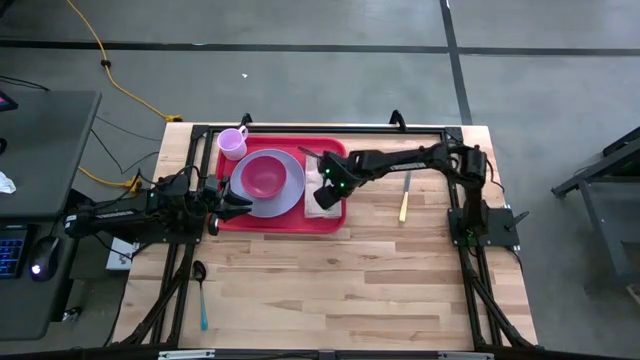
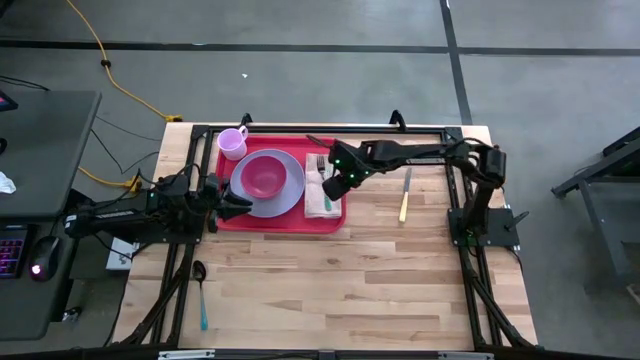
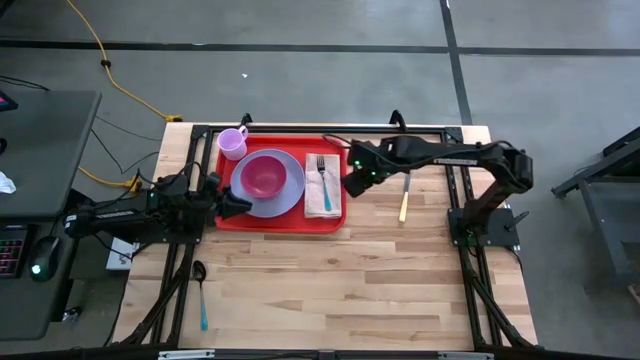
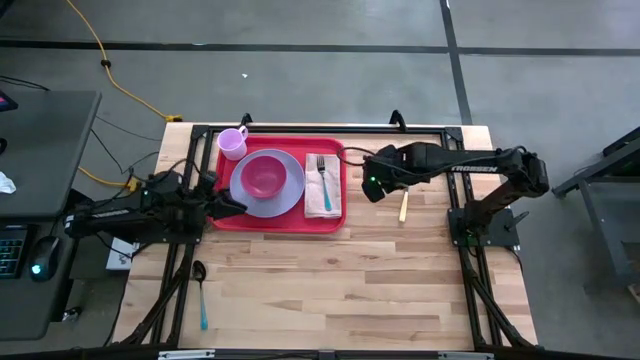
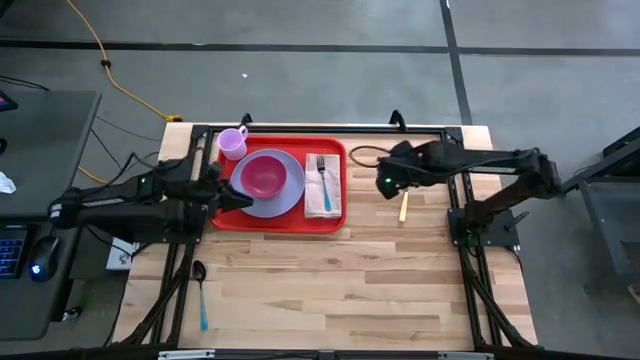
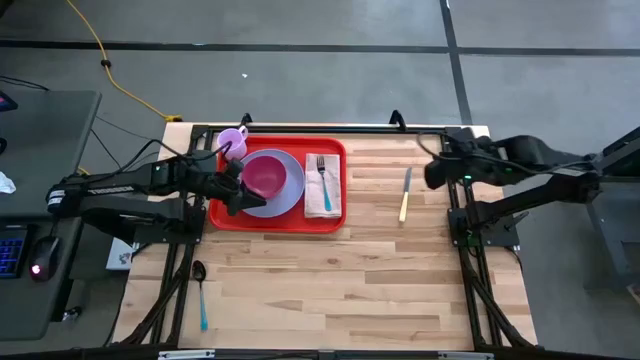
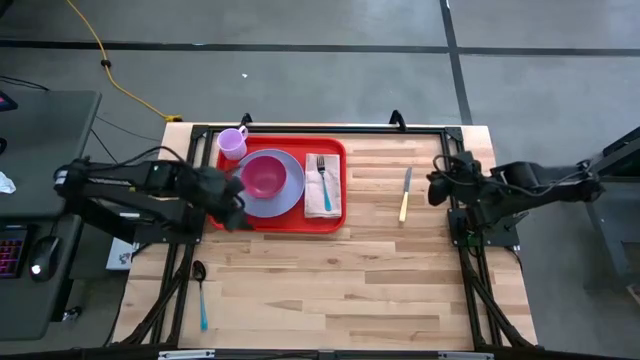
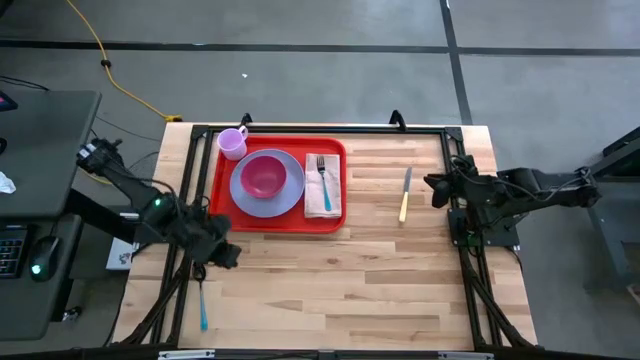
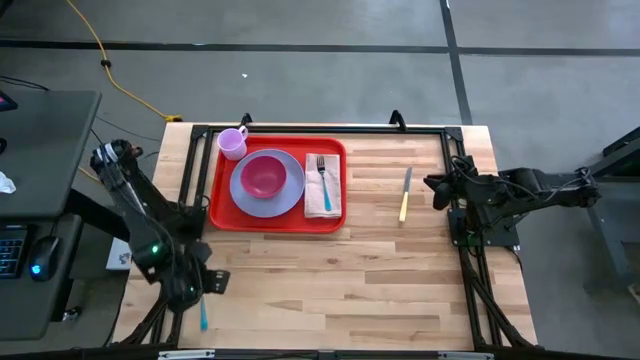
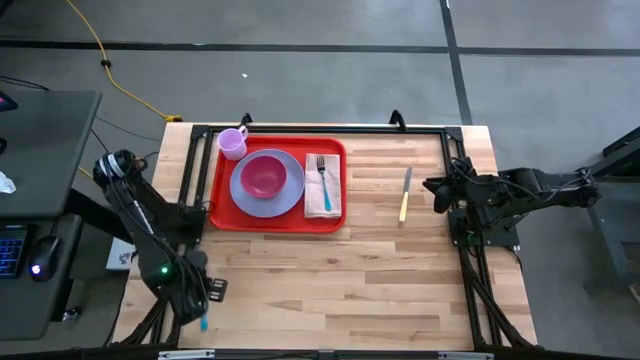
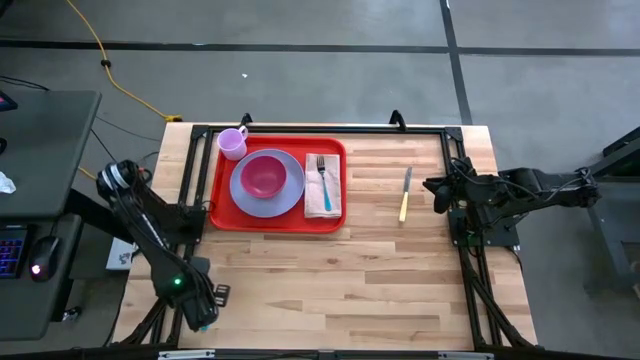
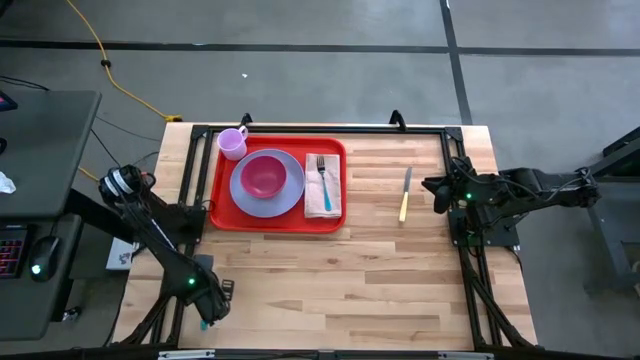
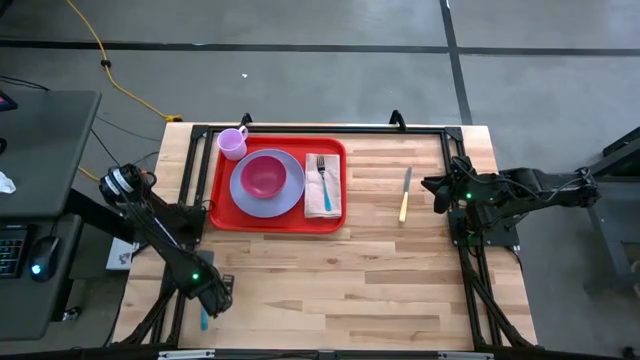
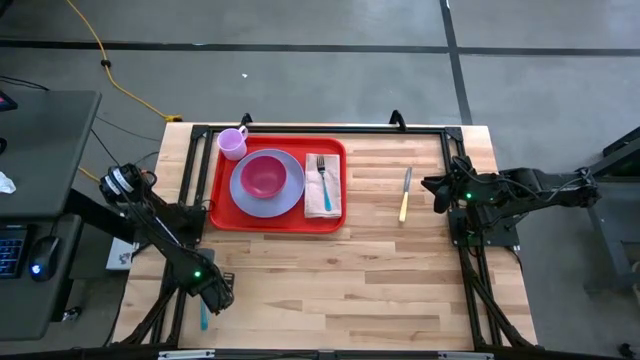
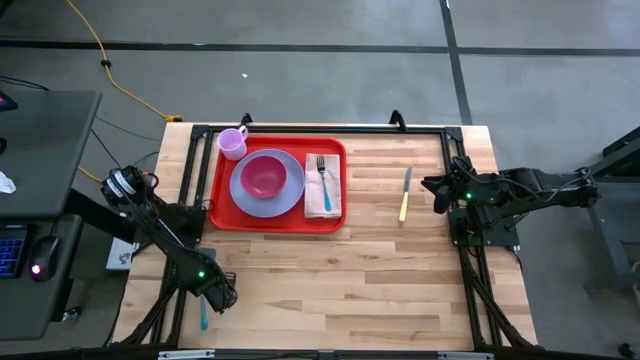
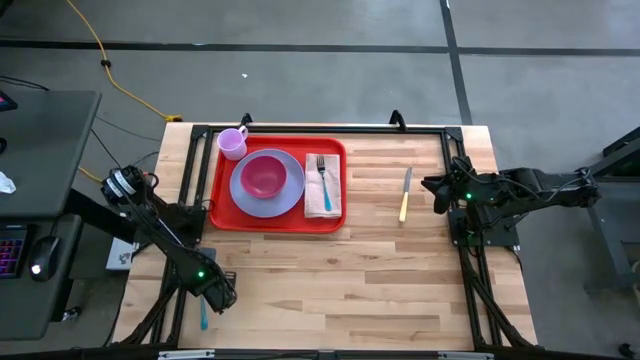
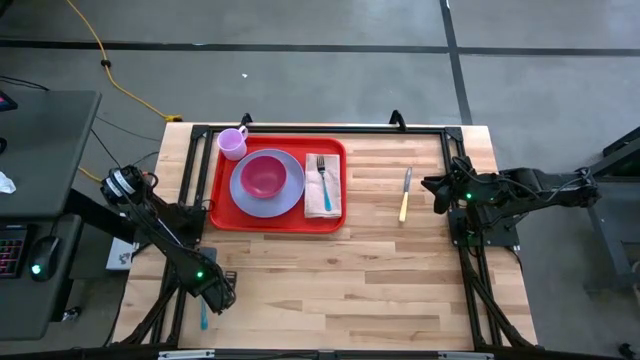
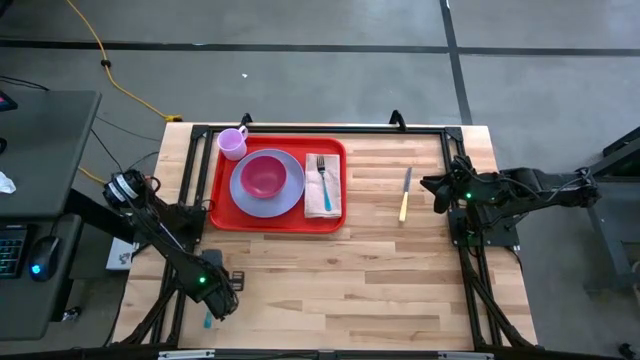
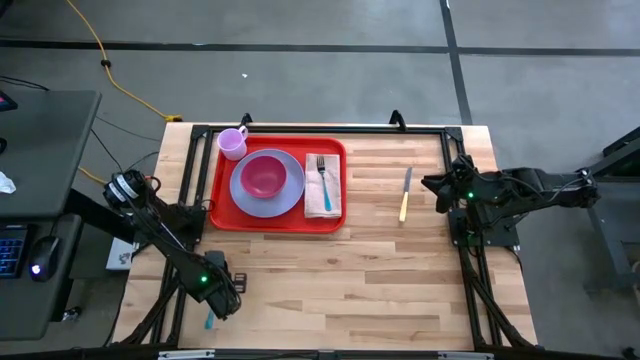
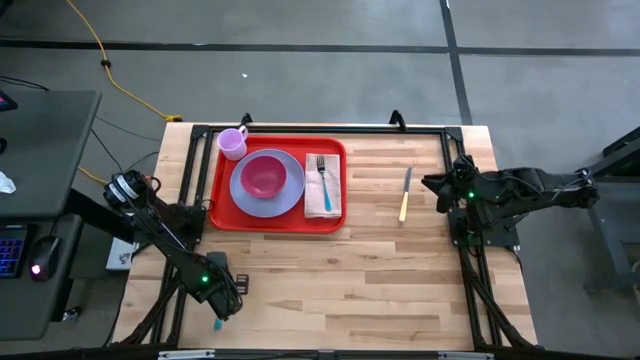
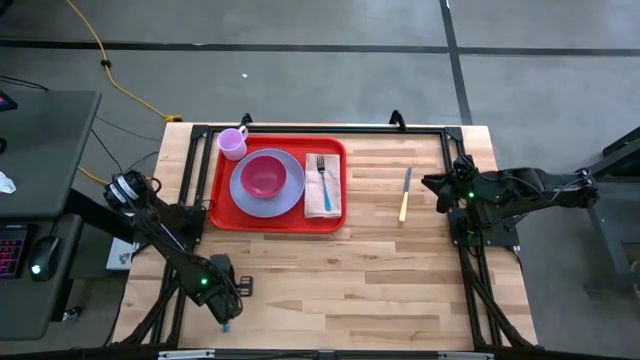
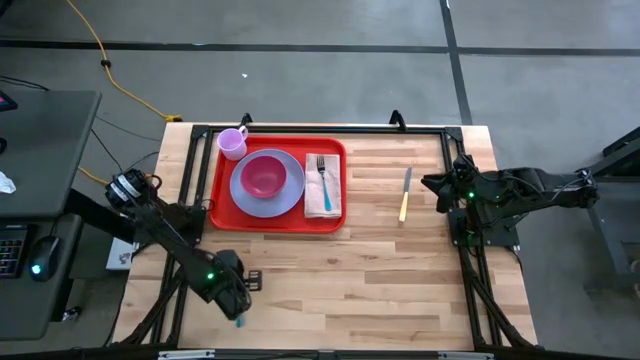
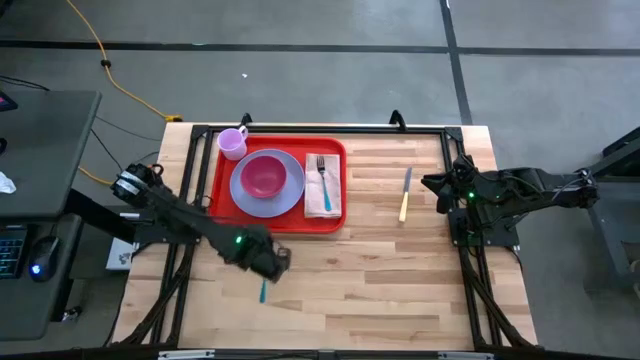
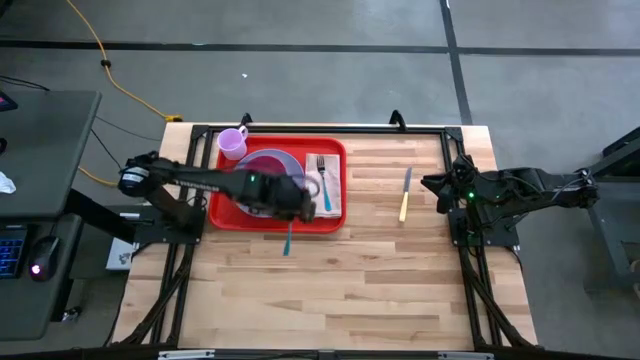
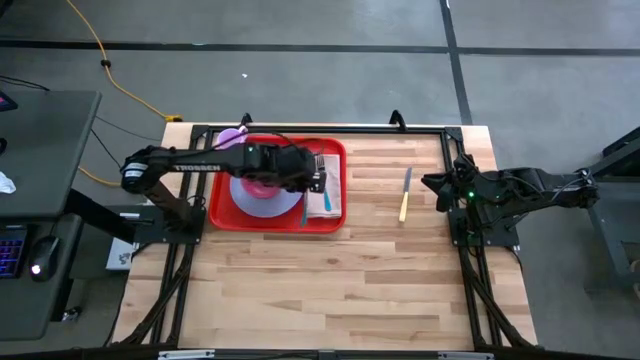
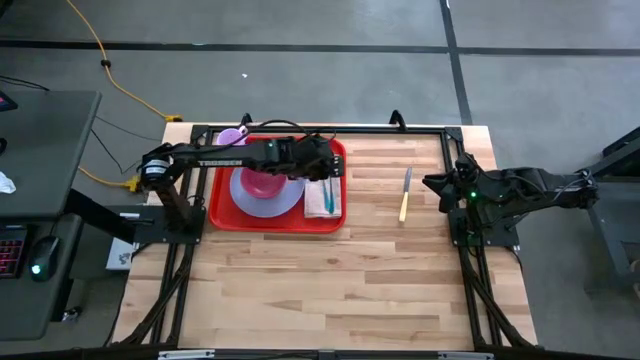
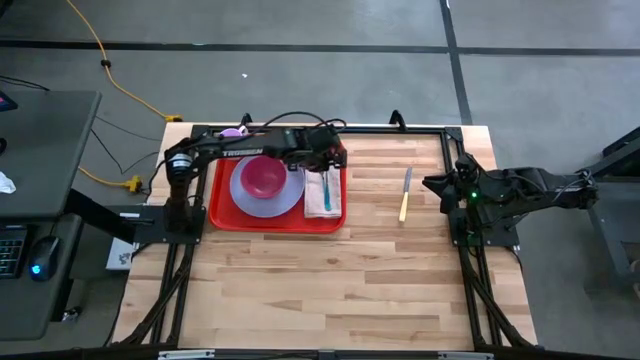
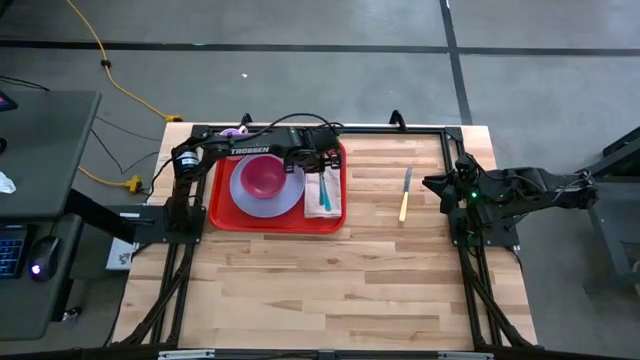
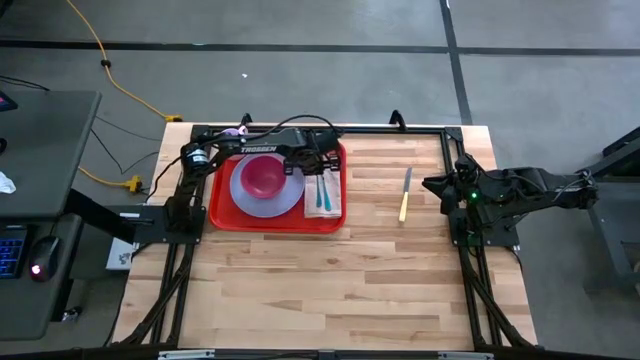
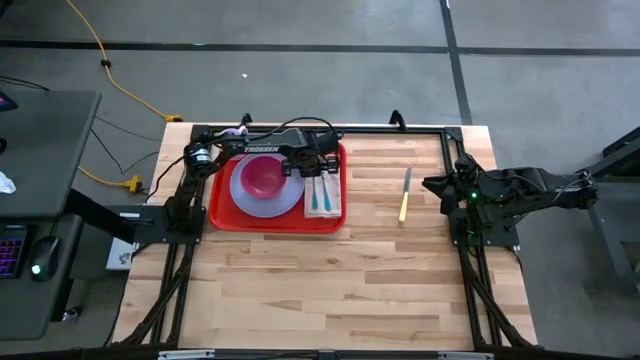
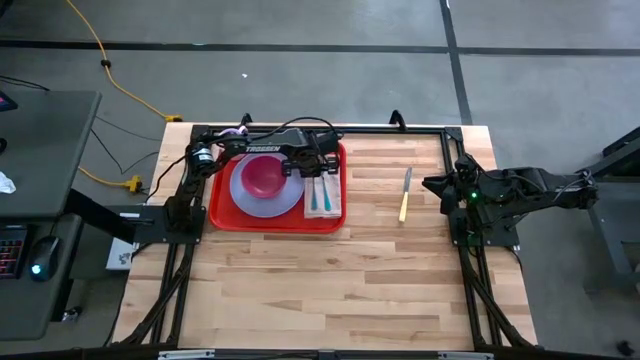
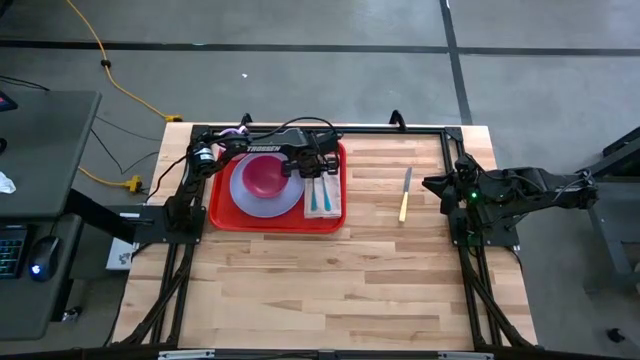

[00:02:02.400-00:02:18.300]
Task: Set up tray
Put the blue spoon on the white table napkin to the left of the blue fork

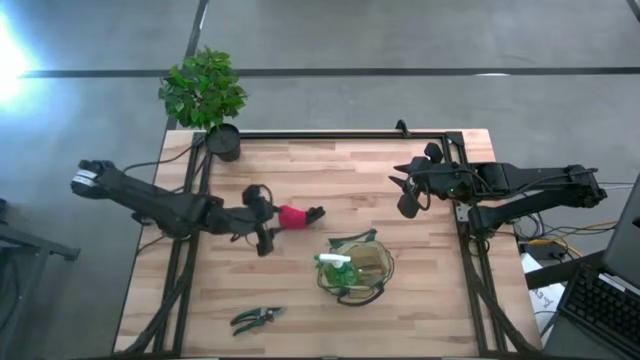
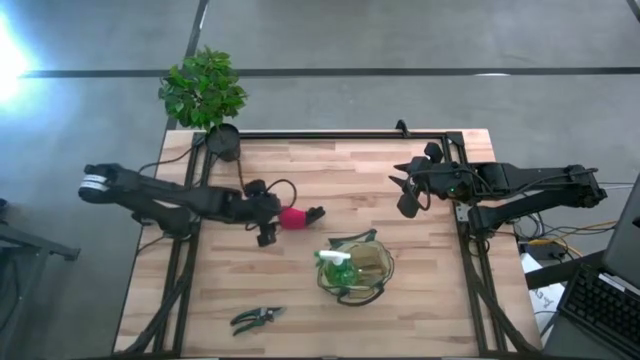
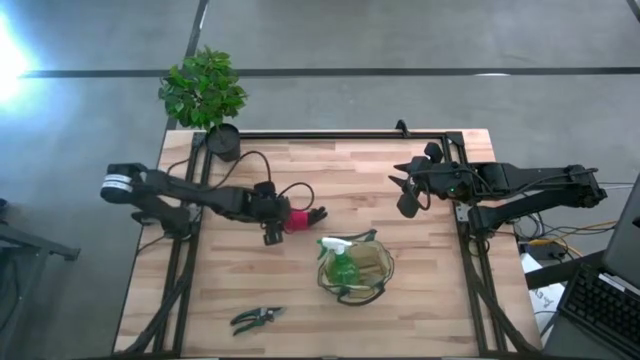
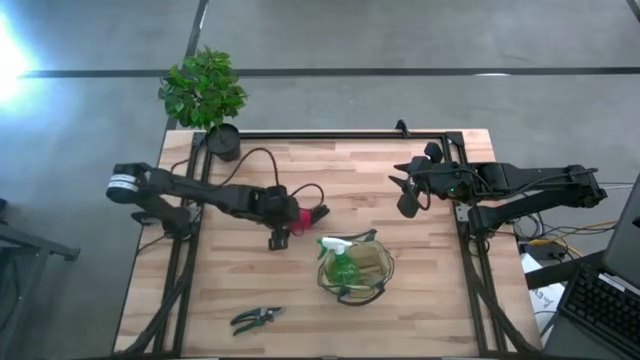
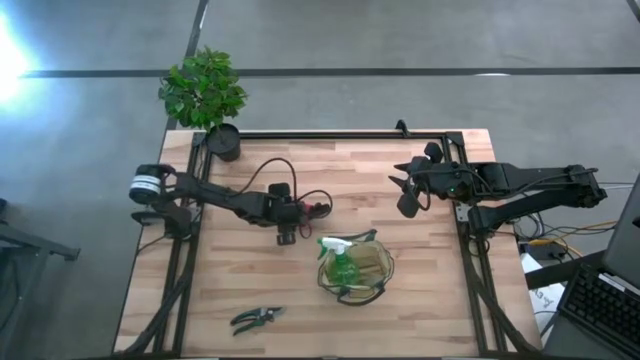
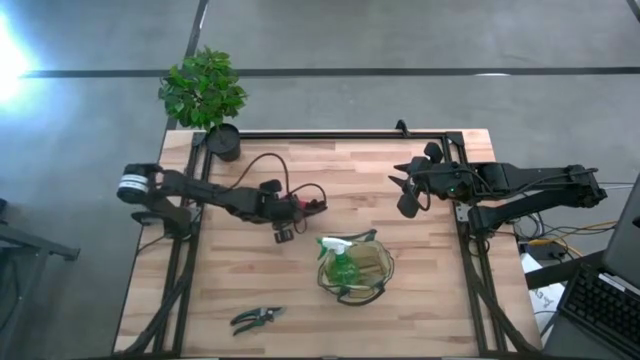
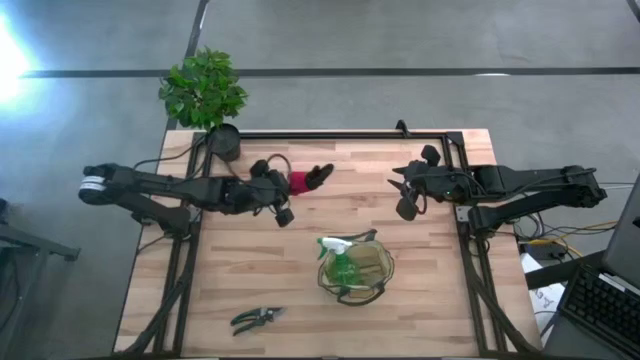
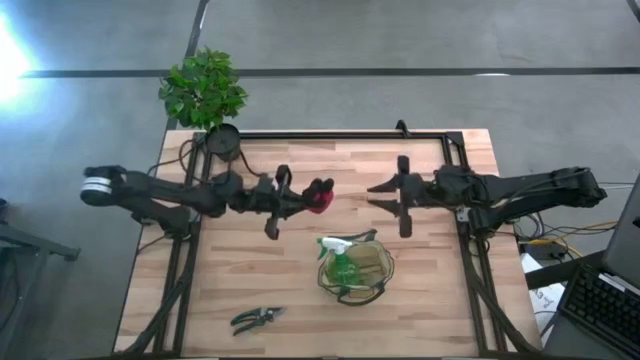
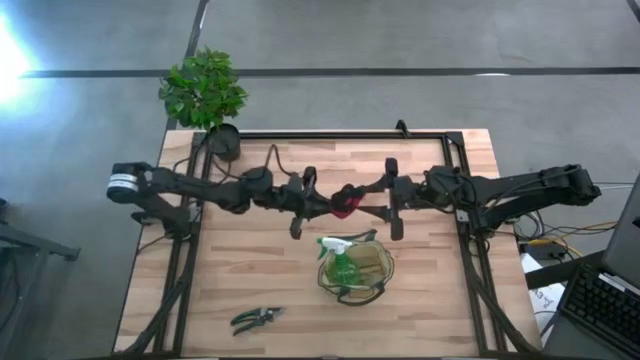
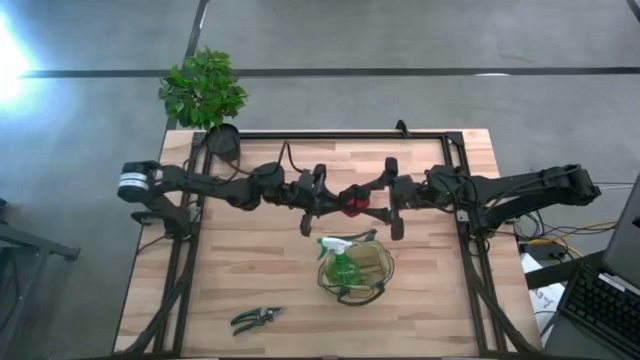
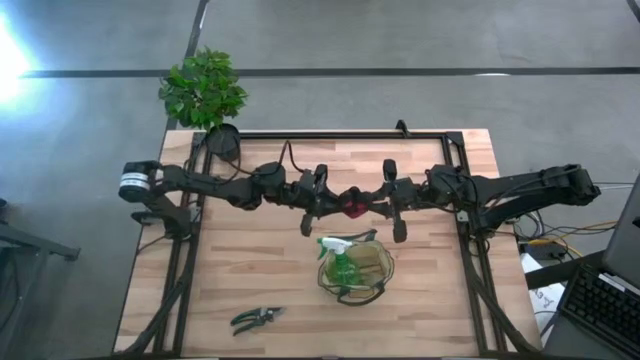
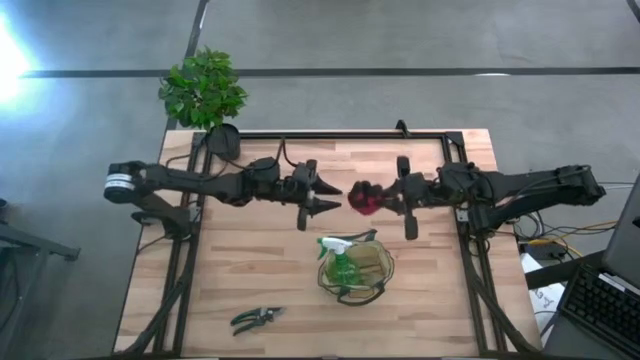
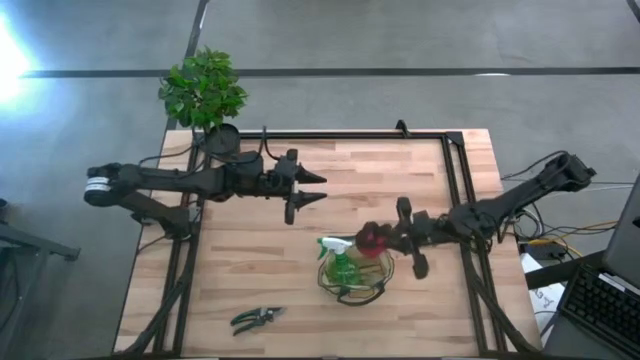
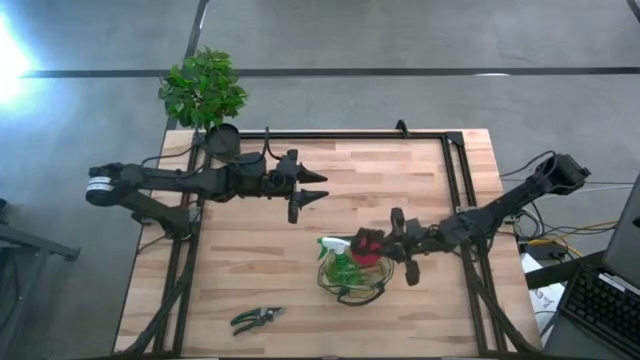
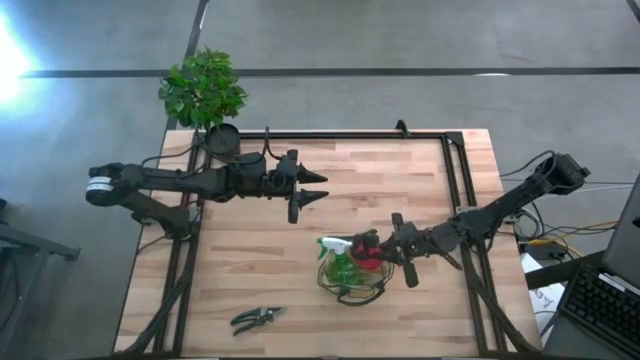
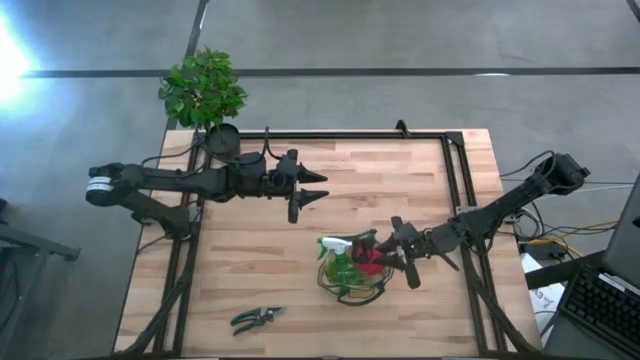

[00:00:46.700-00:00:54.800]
Task: Pick & Place Garden tools in Gardening bag
Put the red gloves into the gardening bag
